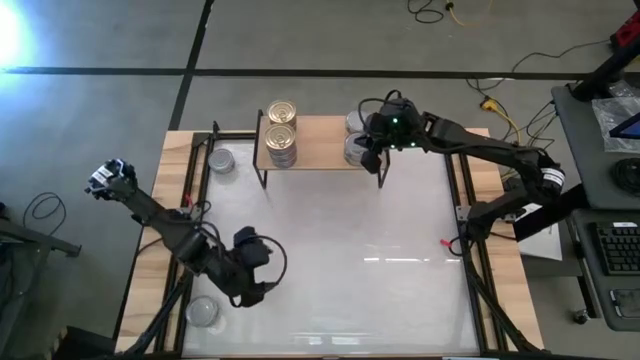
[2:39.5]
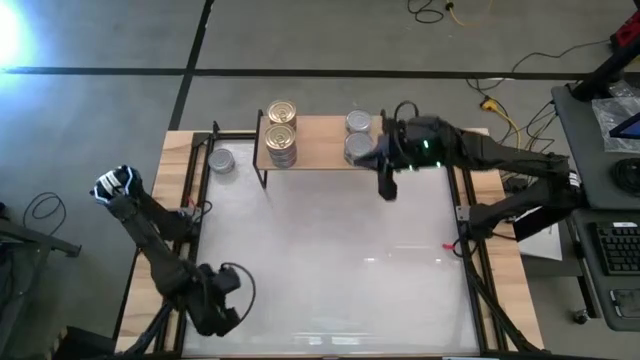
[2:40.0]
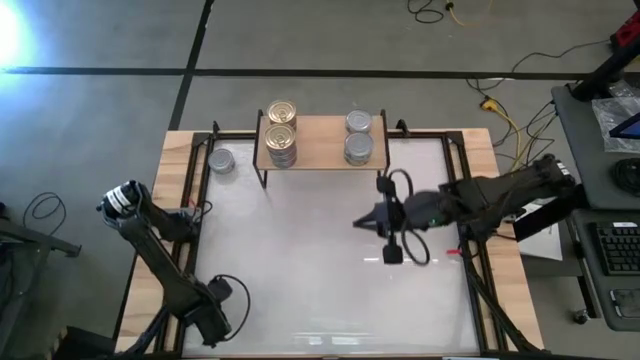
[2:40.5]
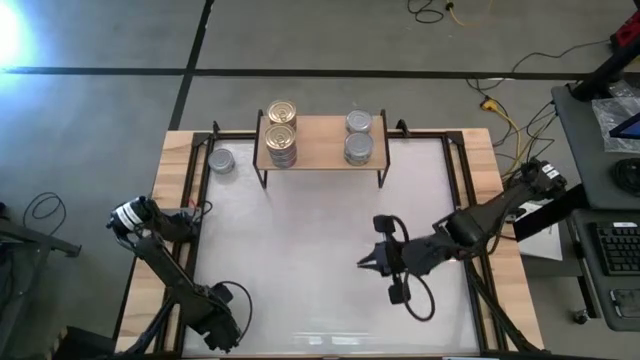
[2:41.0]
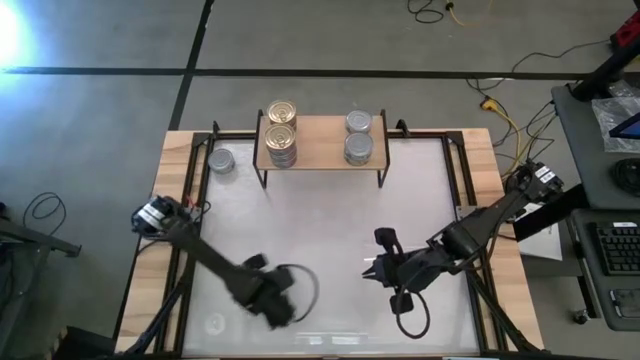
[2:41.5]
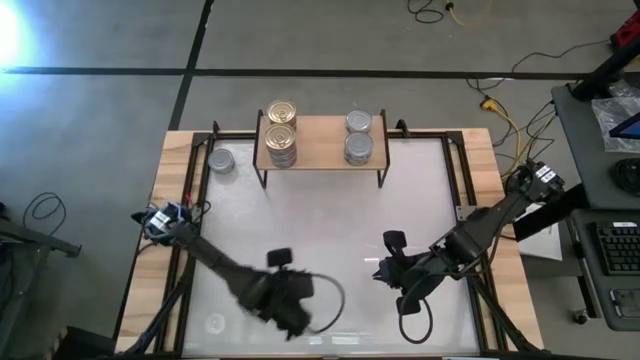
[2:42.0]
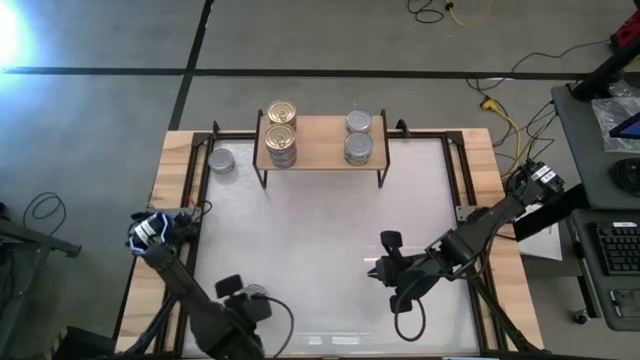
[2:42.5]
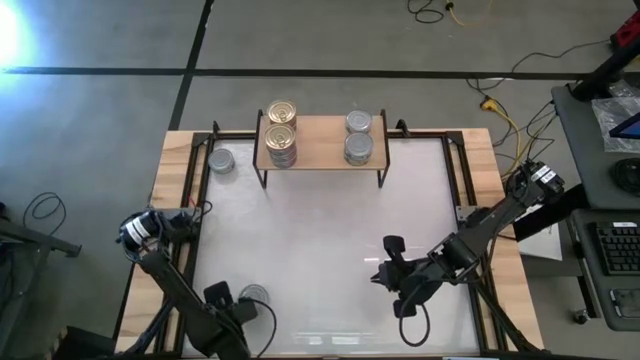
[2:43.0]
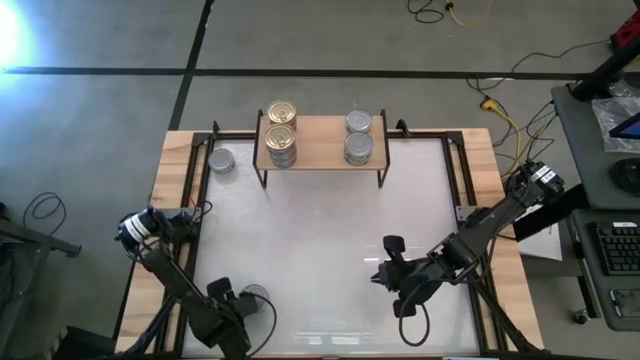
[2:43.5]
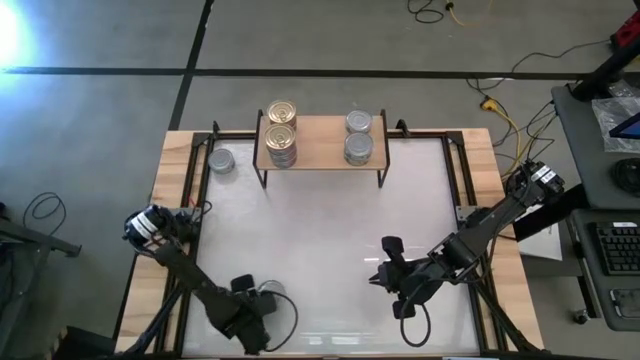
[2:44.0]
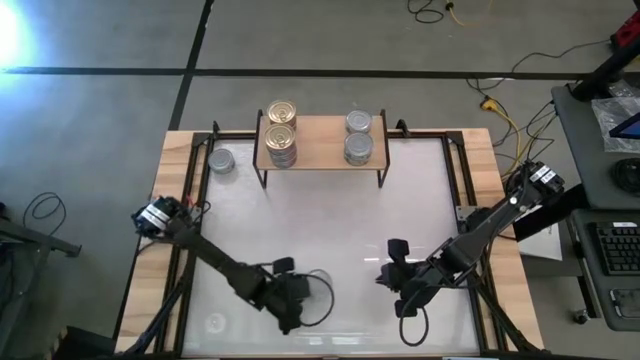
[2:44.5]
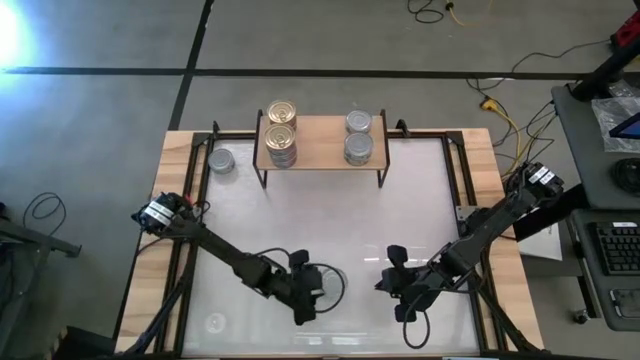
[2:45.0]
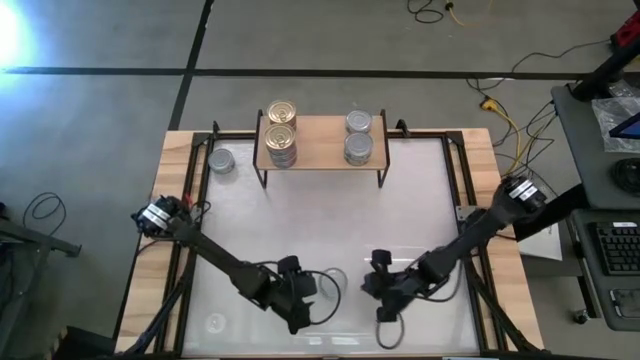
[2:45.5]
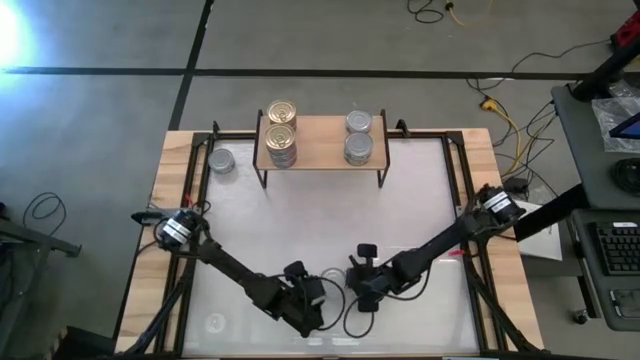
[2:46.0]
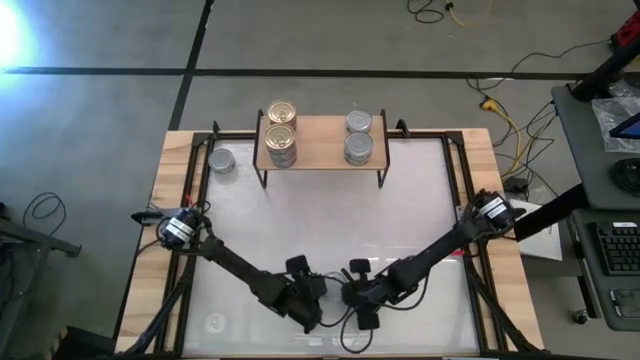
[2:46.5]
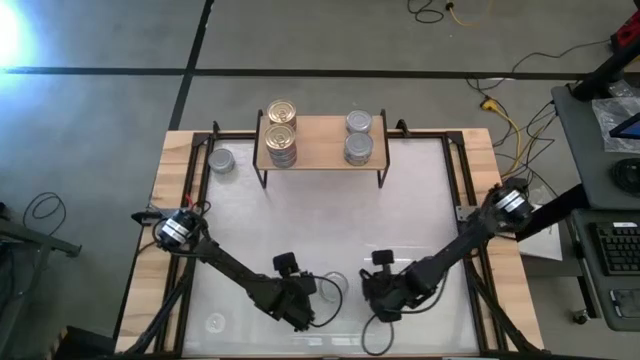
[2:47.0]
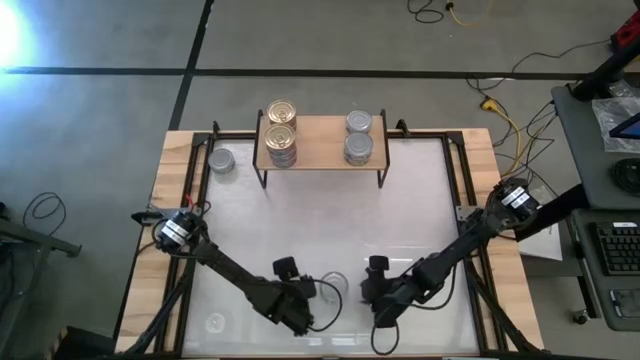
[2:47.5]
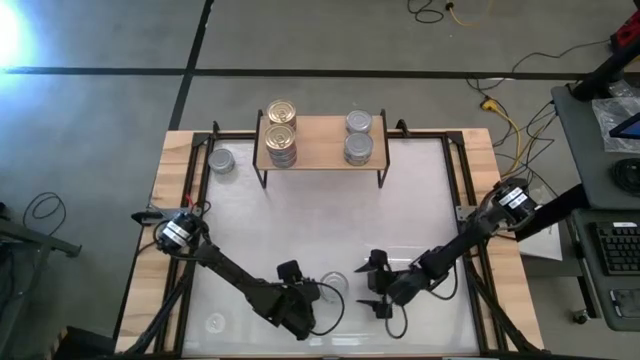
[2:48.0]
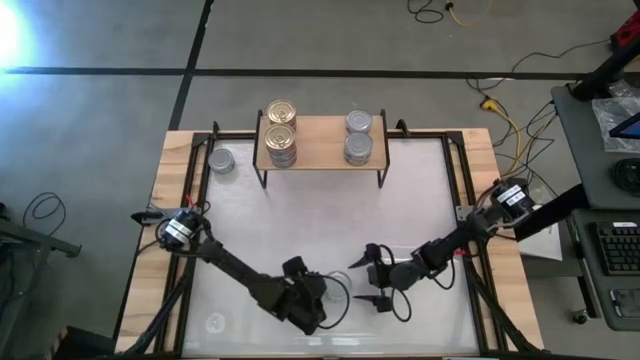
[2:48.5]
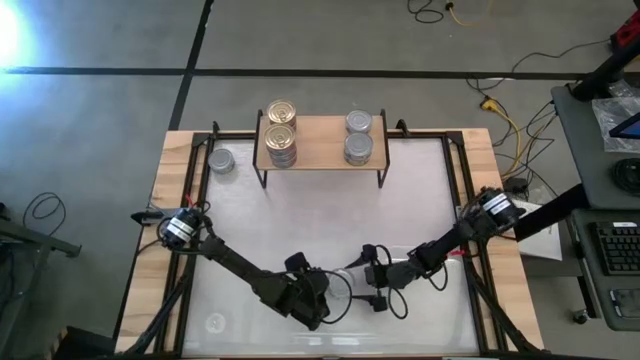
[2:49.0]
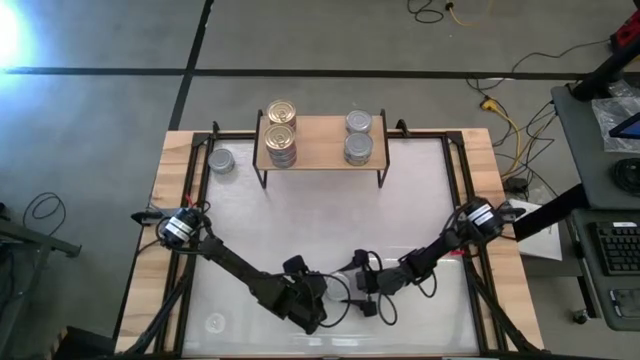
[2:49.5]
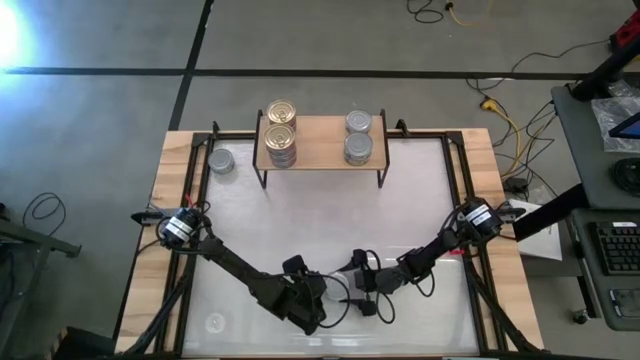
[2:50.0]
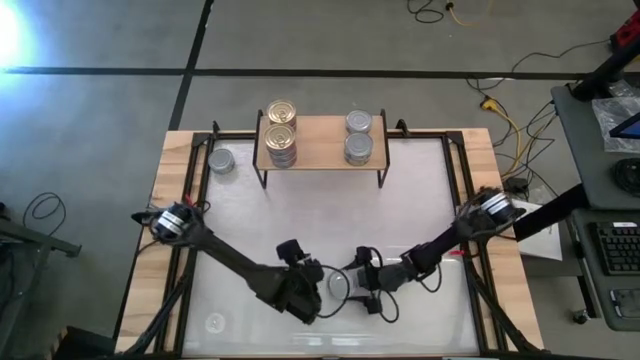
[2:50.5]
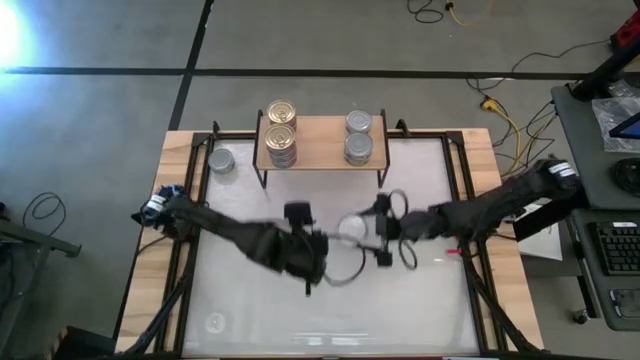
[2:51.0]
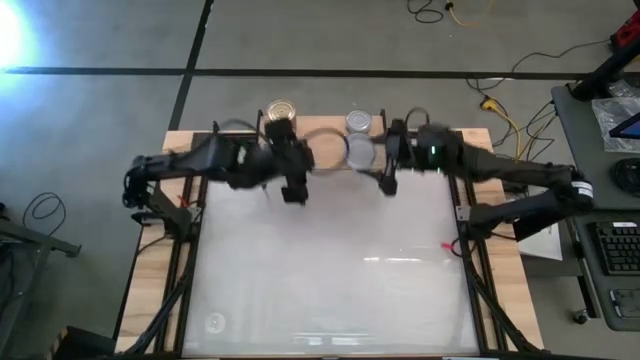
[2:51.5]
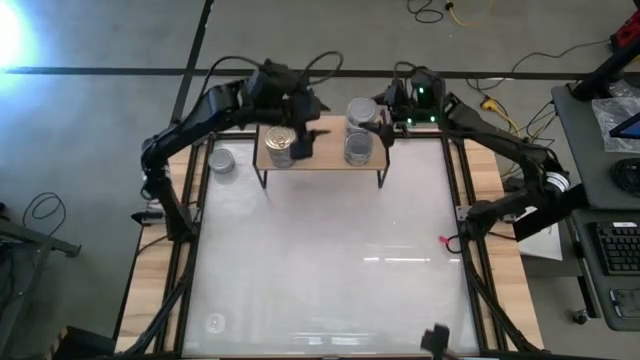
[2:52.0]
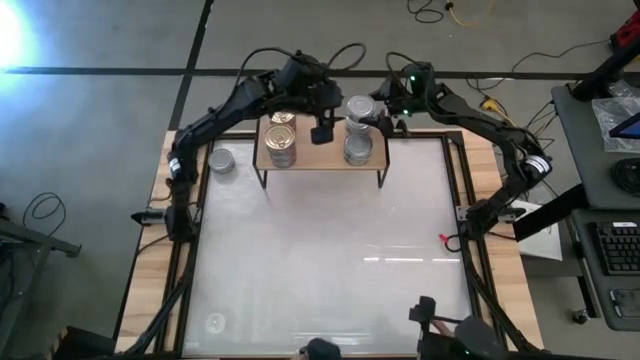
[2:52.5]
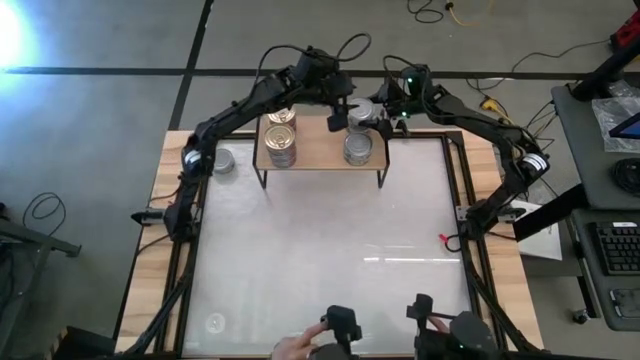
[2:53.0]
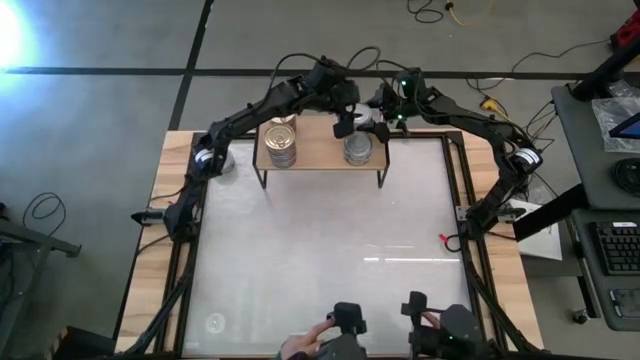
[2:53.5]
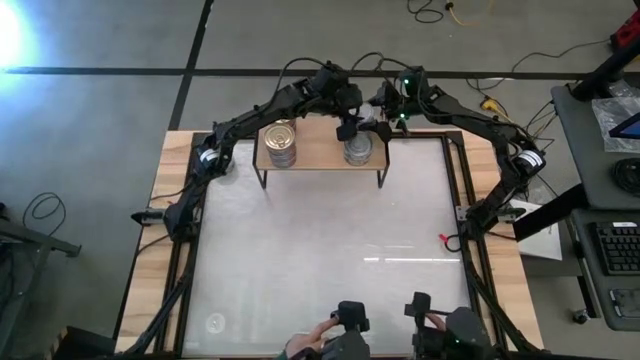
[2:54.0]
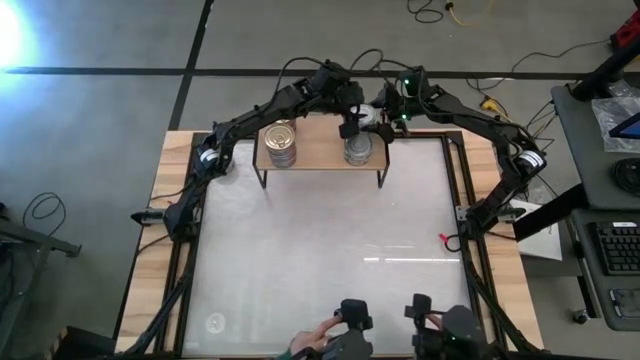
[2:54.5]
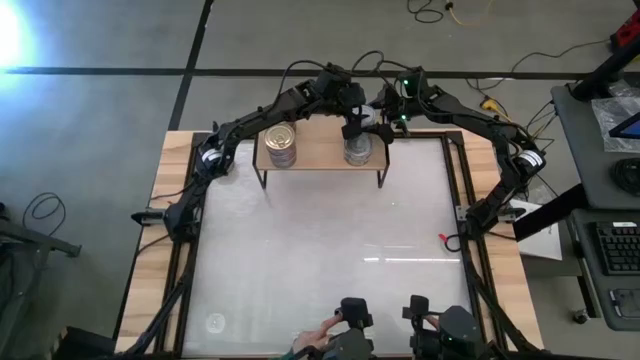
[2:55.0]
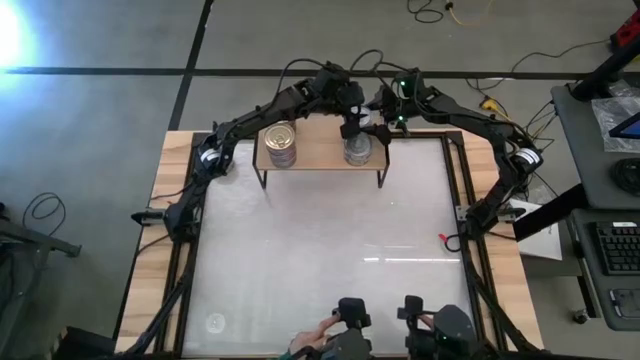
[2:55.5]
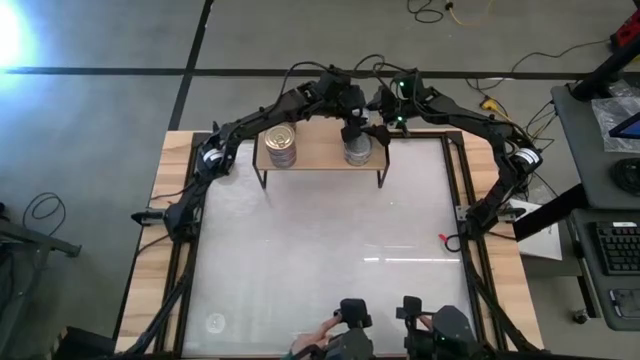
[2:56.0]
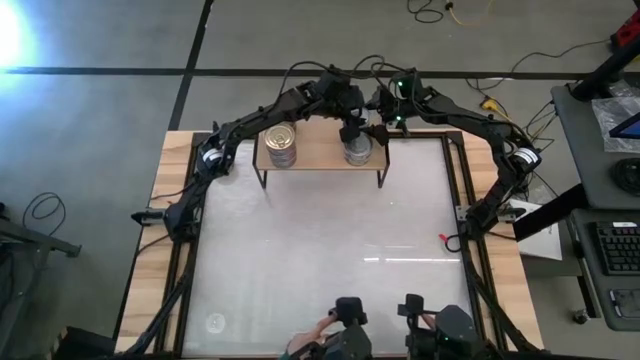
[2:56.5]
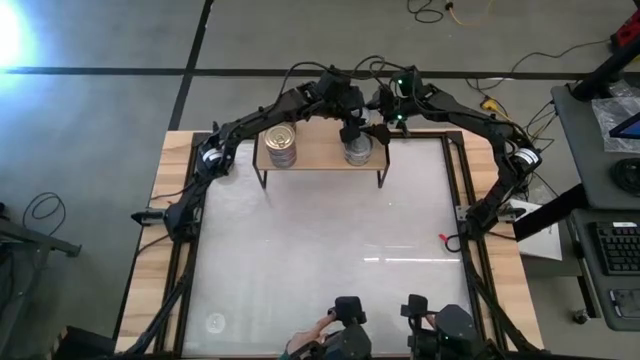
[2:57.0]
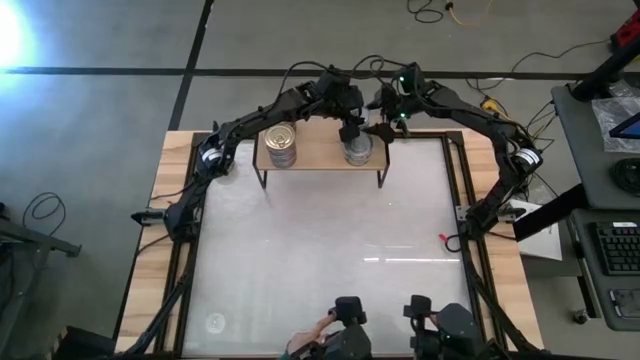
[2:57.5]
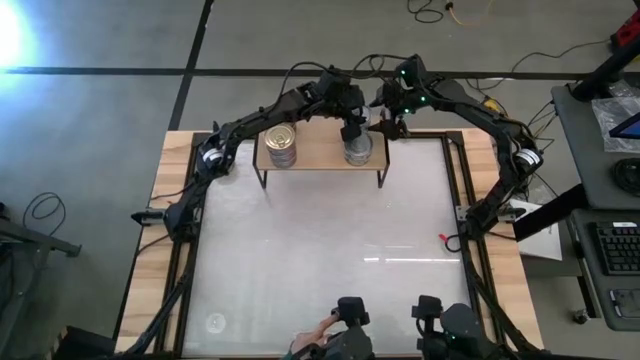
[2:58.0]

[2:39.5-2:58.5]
Task: Stack canned seafood by type on shelf
Stack the green tuna can on top of the other green tuna on the shelf

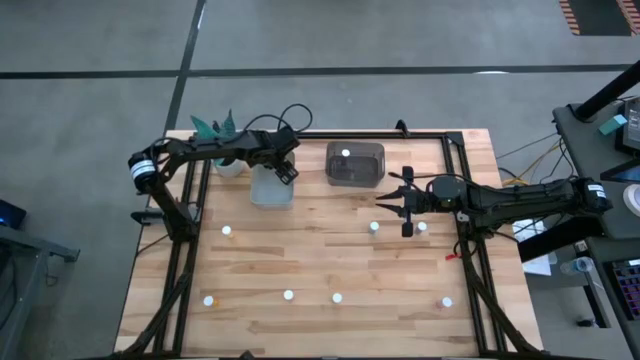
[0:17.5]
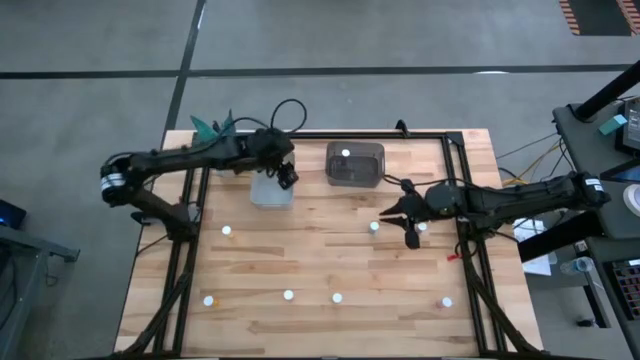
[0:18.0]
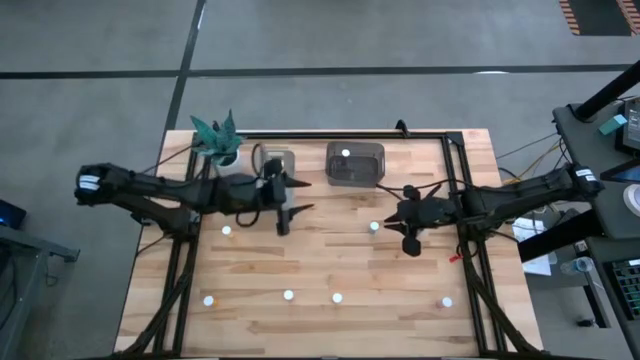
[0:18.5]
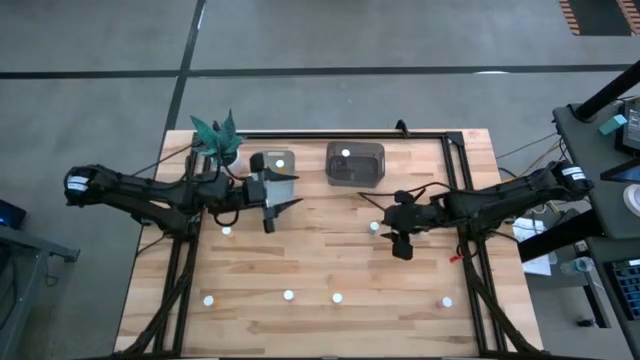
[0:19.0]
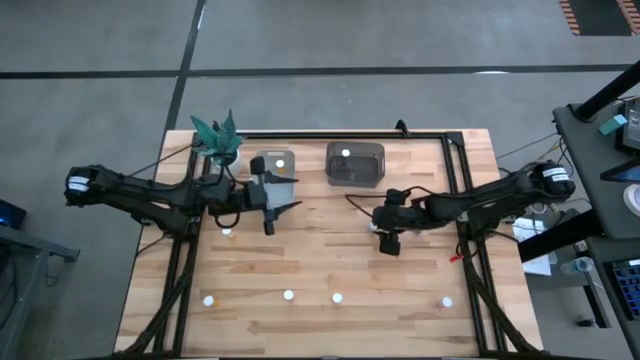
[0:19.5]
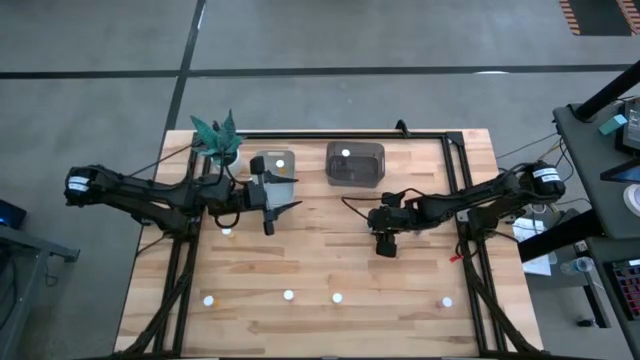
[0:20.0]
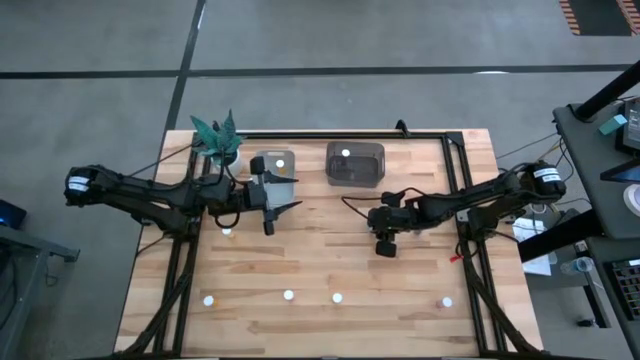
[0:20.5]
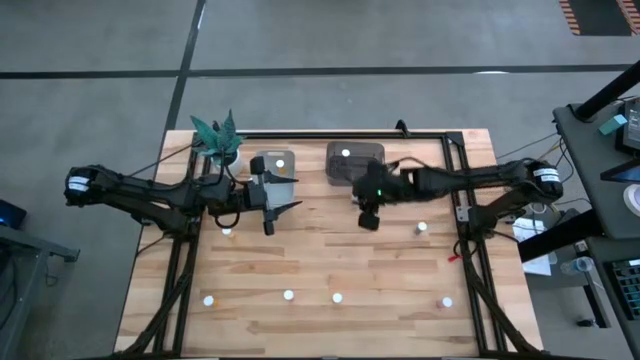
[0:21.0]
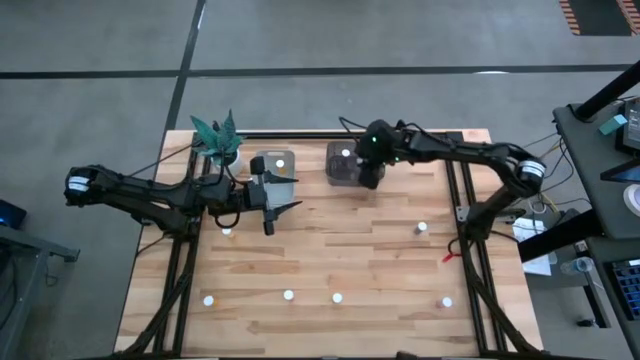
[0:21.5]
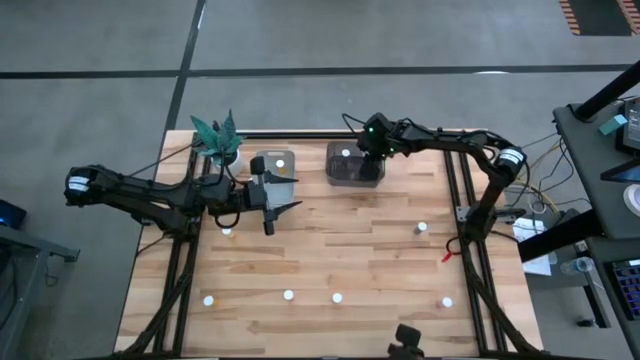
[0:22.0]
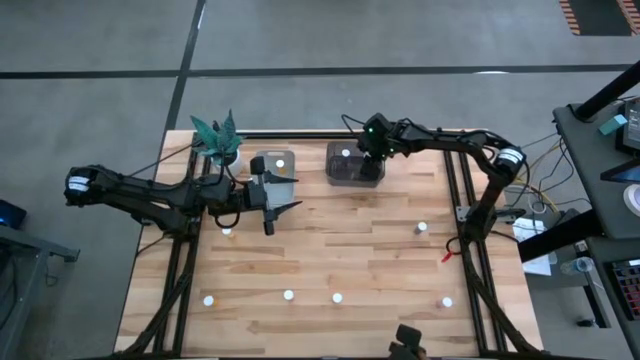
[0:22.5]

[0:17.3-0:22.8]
Task: Pick and place medicine bottles into bin by pill shape (circle, oval)
Put the left blue capsule bottle into the black bin
